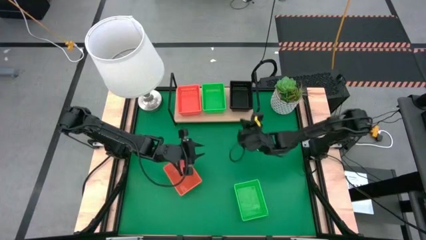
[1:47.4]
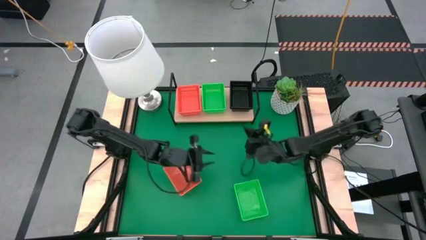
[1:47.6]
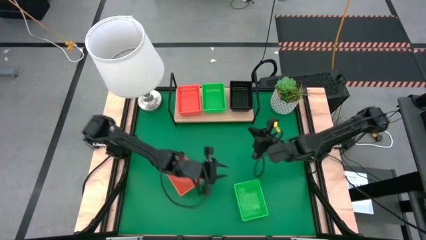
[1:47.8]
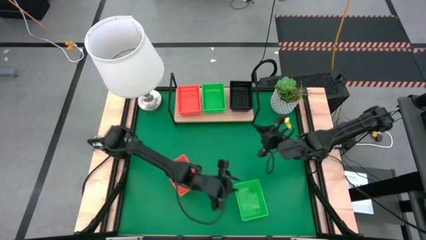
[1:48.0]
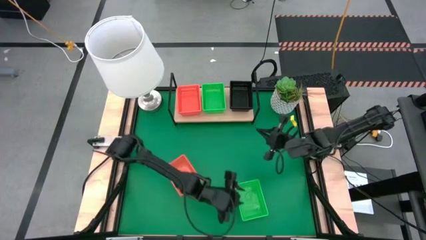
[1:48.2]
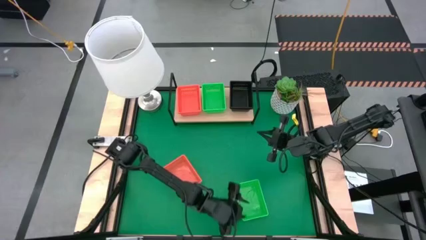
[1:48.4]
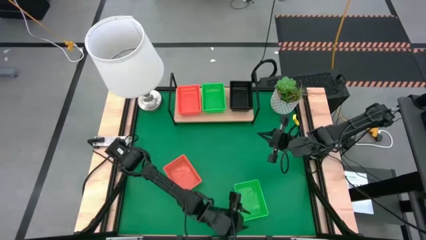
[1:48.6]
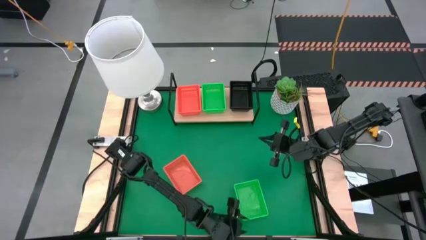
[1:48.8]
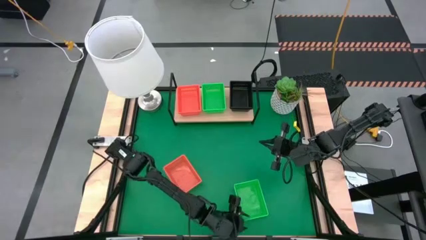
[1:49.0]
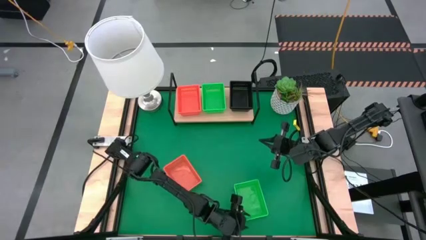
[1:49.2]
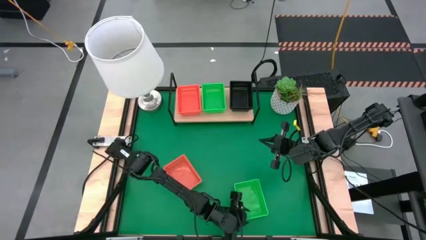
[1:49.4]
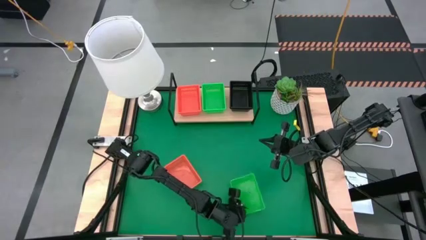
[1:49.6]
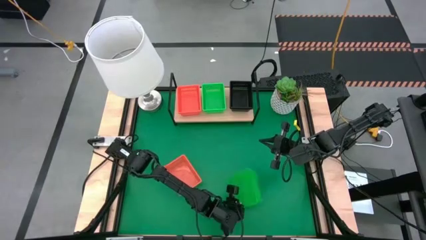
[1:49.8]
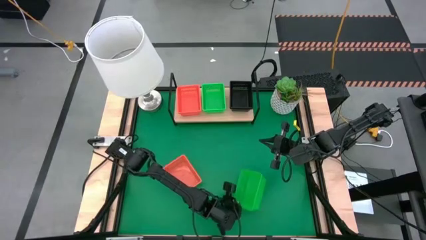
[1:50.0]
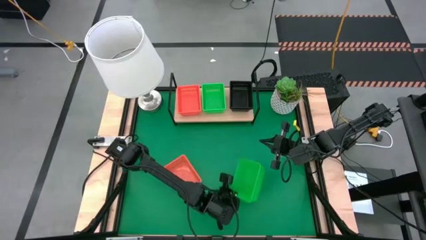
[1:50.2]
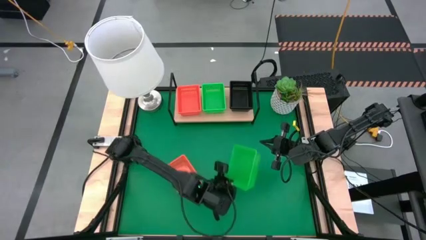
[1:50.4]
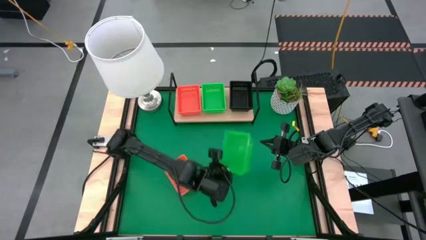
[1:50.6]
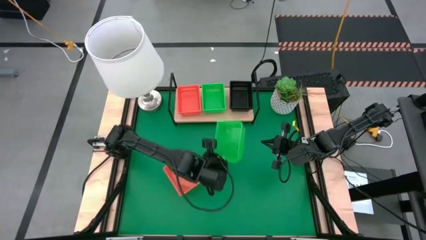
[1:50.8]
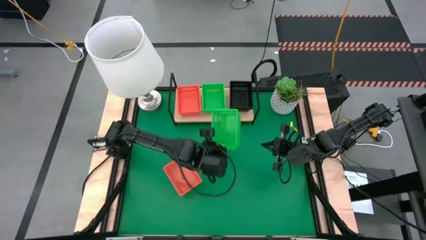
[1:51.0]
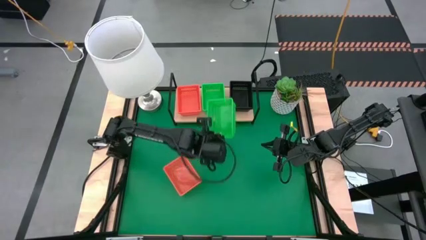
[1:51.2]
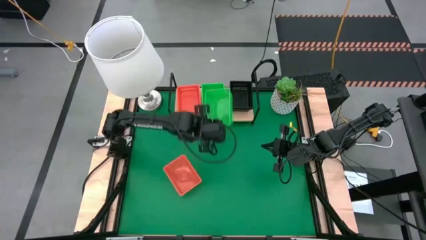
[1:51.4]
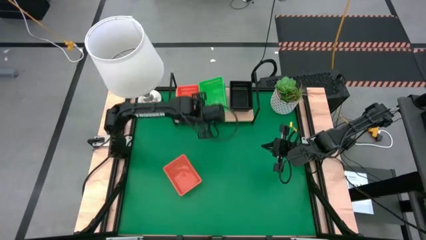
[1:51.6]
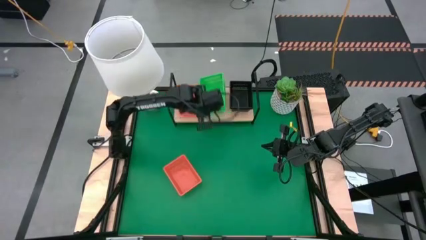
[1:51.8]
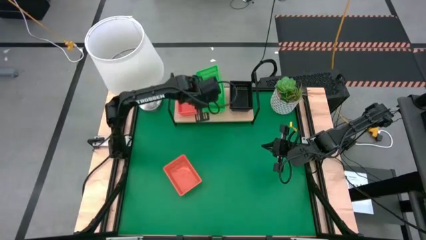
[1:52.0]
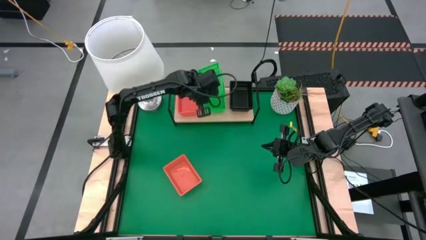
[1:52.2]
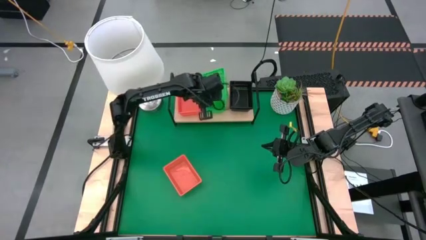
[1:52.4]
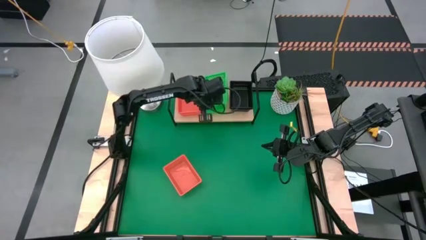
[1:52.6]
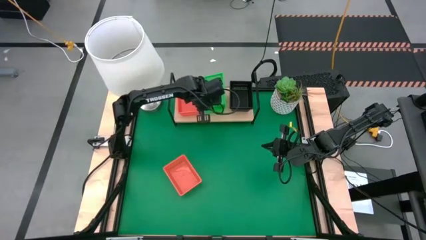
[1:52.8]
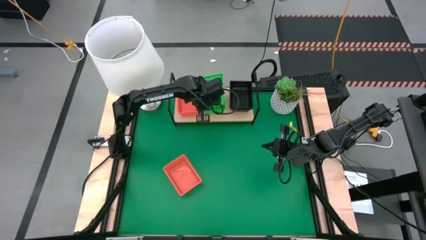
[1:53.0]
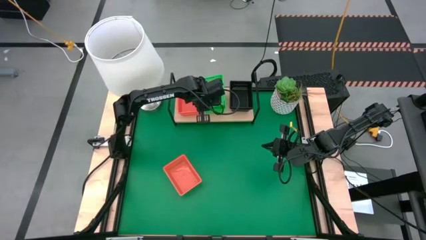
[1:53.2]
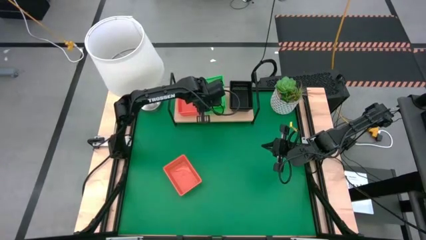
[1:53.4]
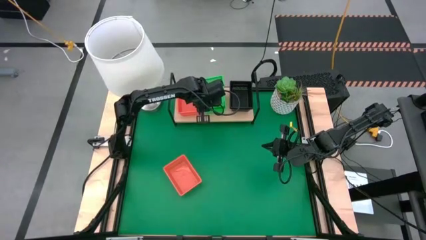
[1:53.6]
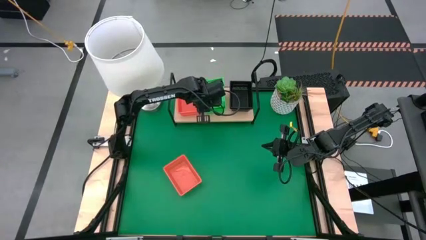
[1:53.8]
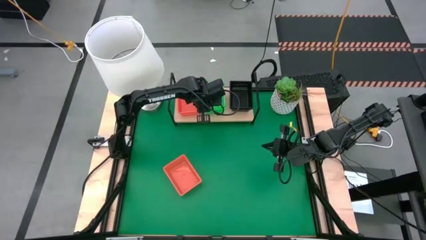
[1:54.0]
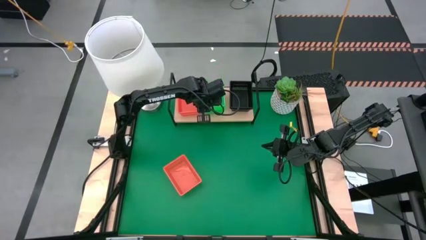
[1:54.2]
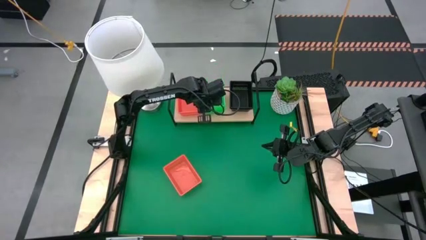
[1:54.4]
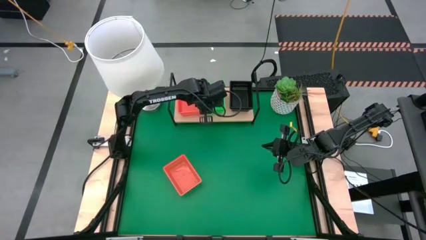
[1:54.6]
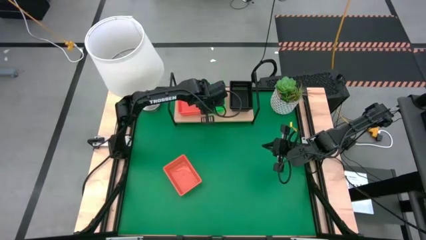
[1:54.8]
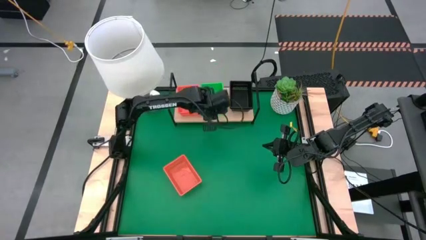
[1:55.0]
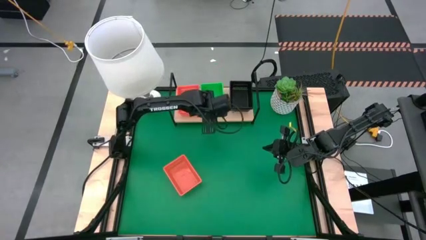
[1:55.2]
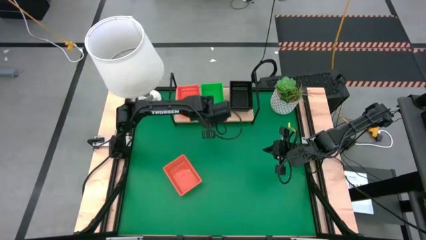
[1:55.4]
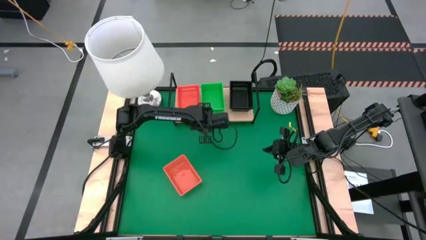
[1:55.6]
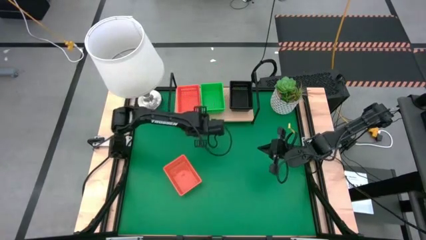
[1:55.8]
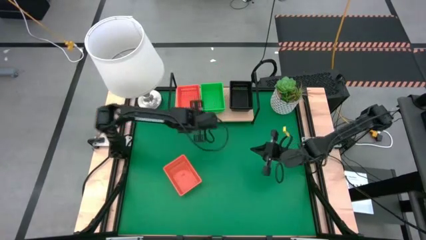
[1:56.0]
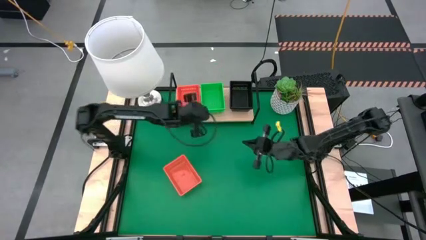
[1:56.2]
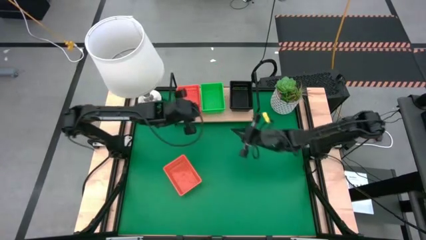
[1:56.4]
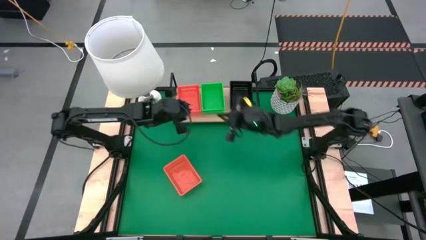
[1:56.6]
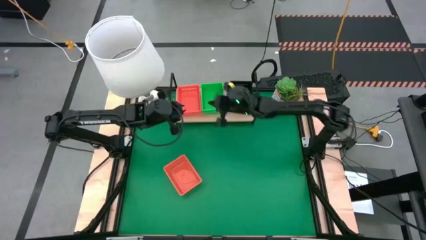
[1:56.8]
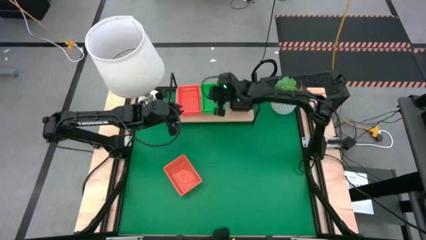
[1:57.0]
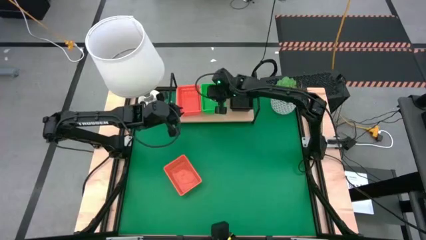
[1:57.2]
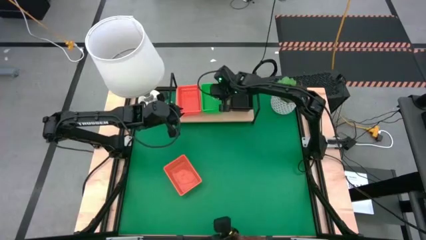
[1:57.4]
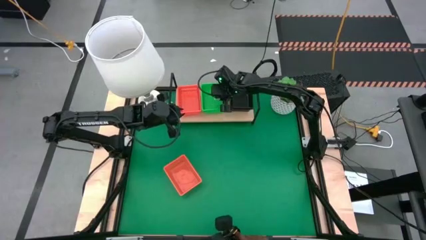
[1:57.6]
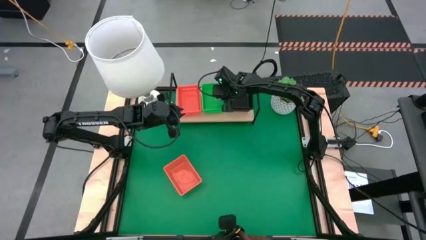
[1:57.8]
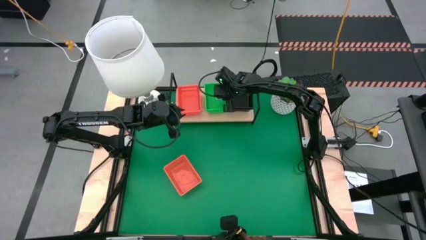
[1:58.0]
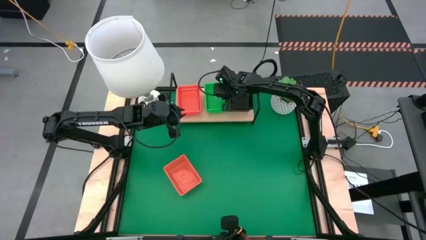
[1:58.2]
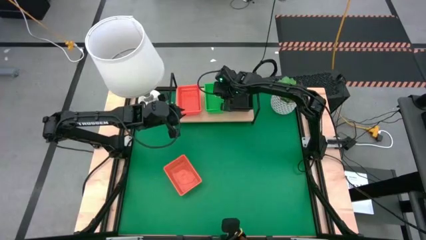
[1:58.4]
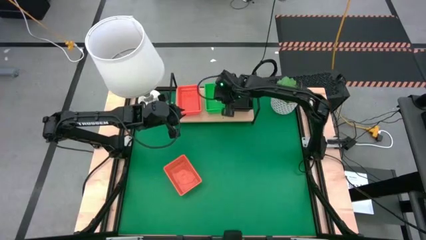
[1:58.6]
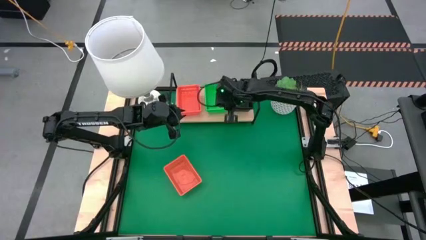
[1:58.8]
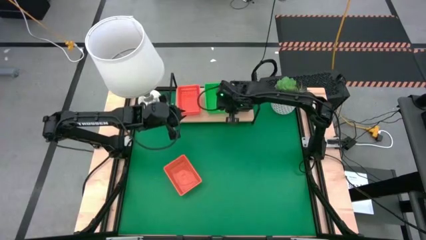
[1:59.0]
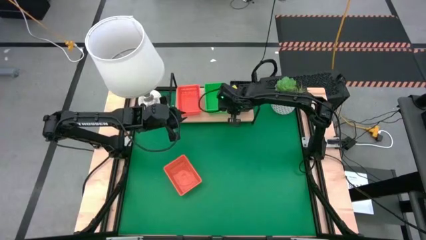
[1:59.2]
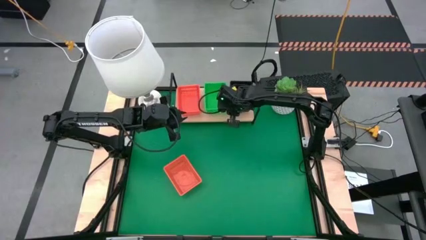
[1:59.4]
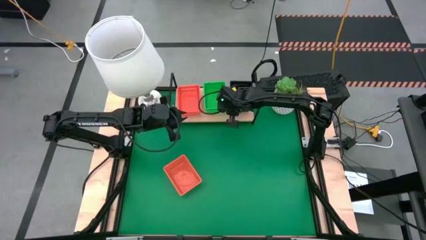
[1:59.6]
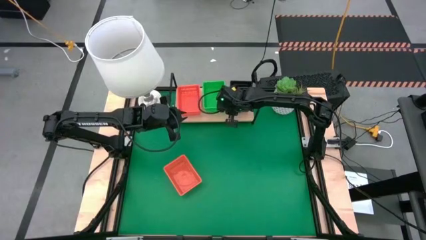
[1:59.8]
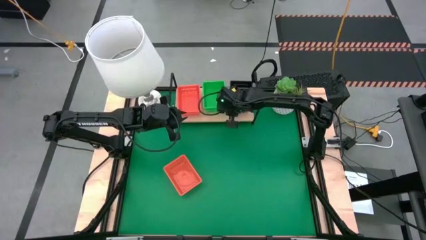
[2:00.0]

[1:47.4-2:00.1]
Task: Stack baskets on shelf by color
Stack the green bin on the green bin on the shelf

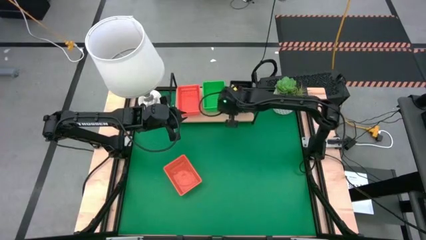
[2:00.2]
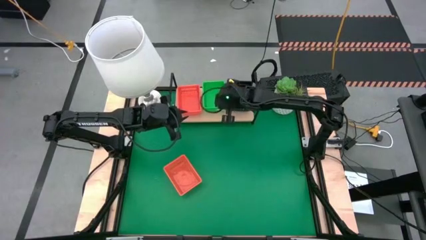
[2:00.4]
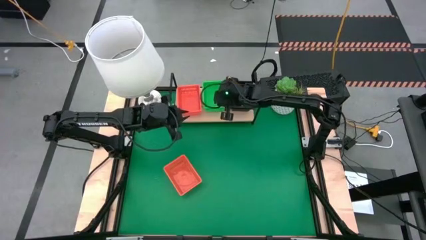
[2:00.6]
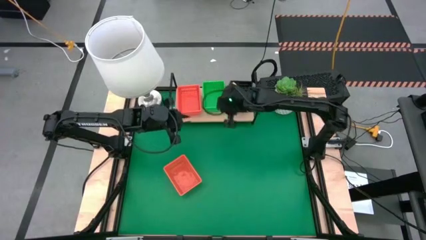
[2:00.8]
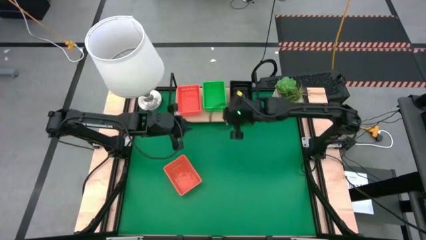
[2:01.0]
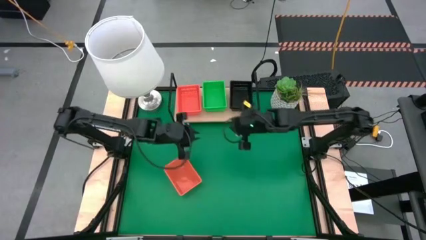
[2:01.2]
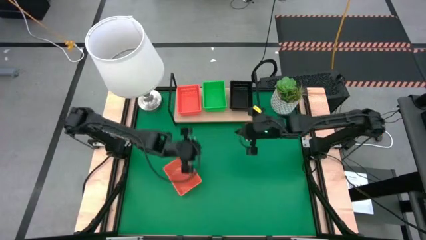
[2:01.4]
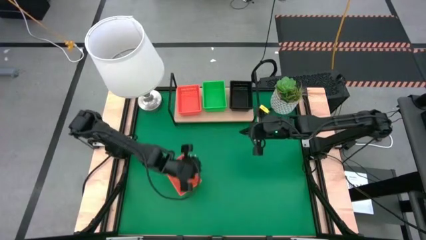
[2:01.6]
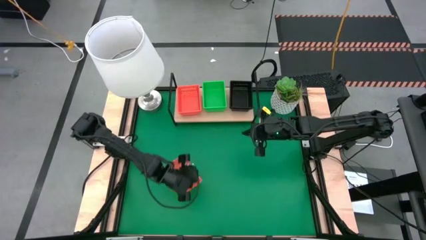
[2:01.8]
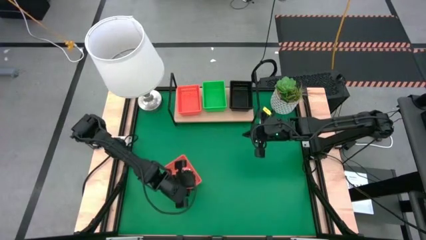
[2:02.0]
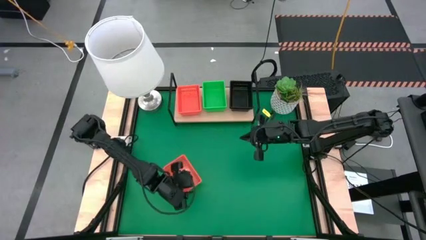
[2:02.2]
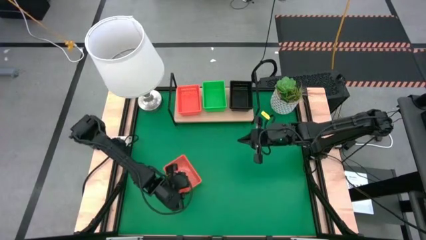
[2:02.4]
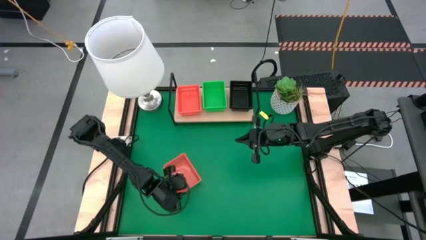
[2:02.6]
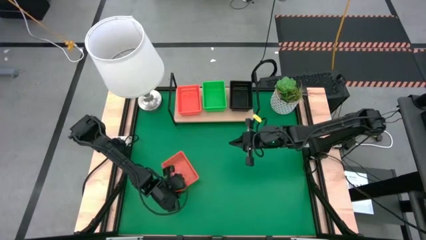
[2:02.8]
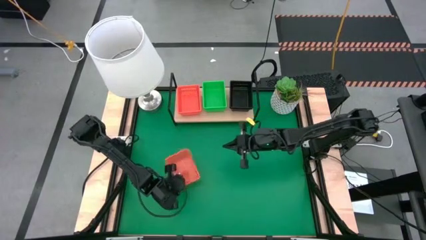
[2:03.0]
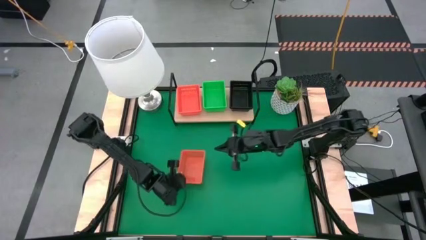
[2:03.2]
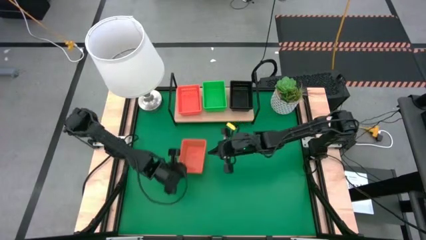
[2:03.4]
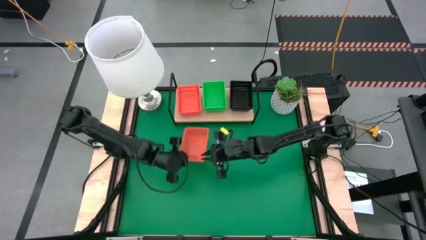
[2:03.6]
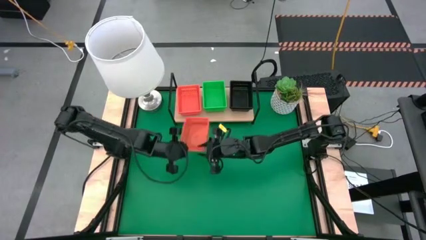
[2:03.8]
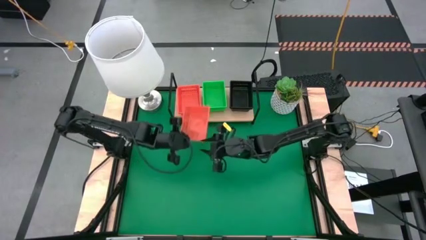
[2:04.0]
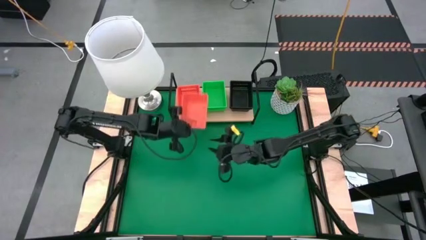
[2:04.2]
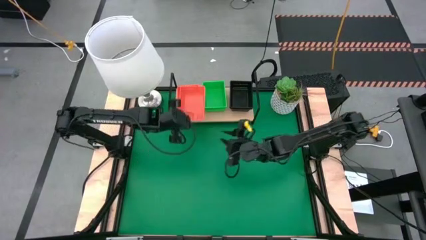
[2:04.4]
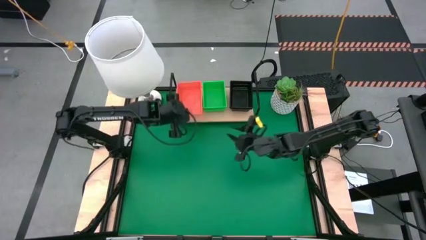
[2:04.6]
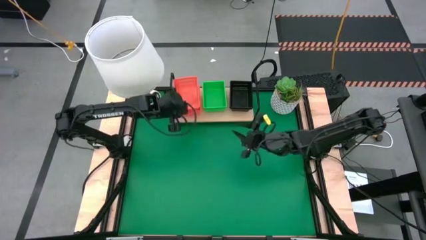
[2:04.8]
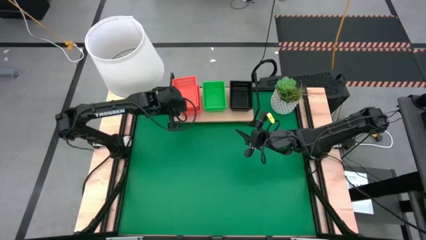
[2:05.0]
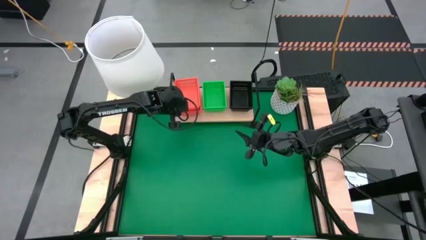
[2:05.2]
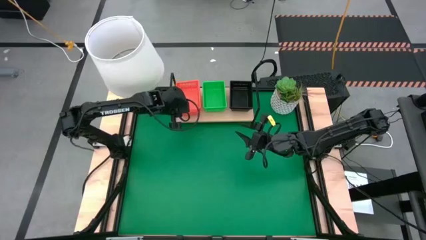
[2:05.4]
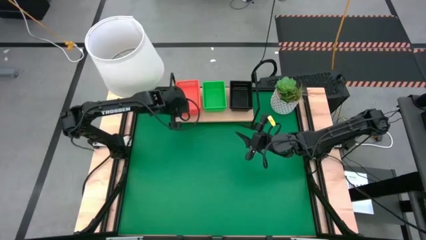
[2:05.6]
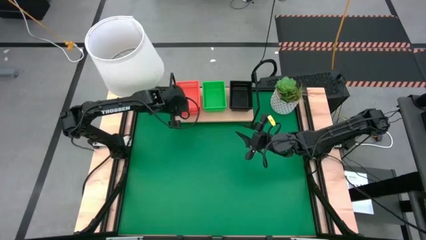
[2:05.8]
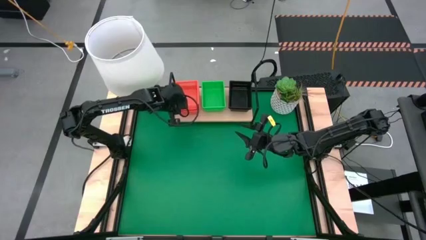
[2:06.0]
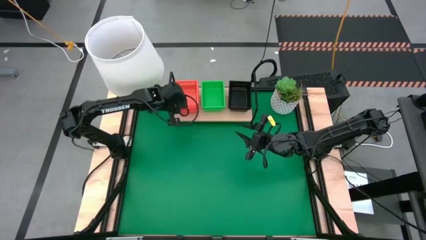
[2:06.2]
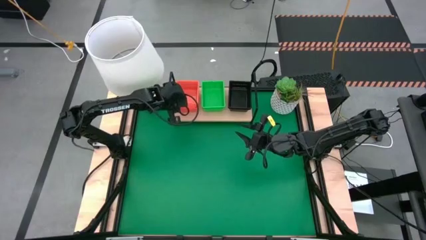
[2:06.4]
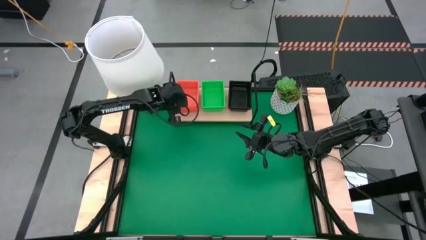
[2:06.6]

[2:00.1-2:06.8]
Stack the orange bin on the orange bin on the shelf
